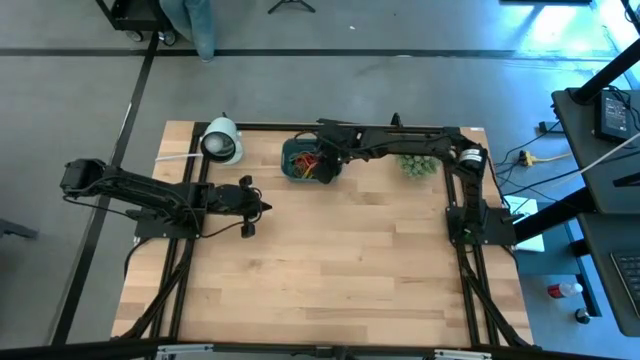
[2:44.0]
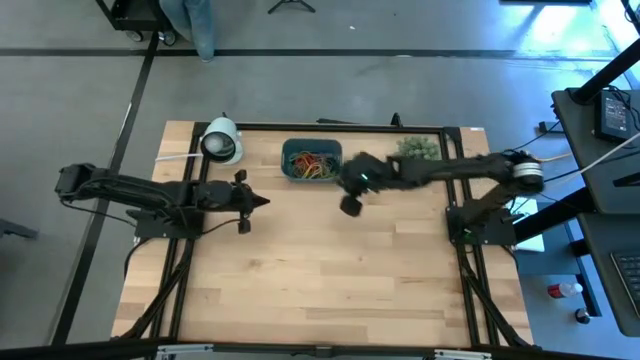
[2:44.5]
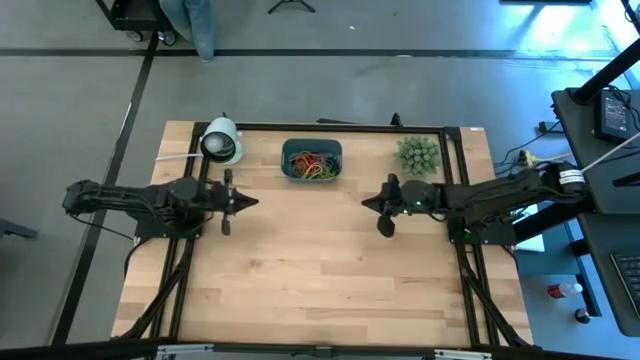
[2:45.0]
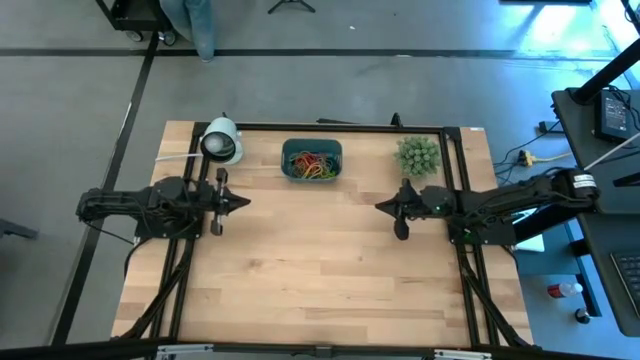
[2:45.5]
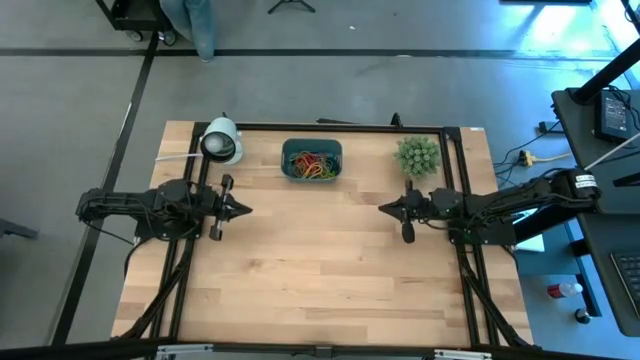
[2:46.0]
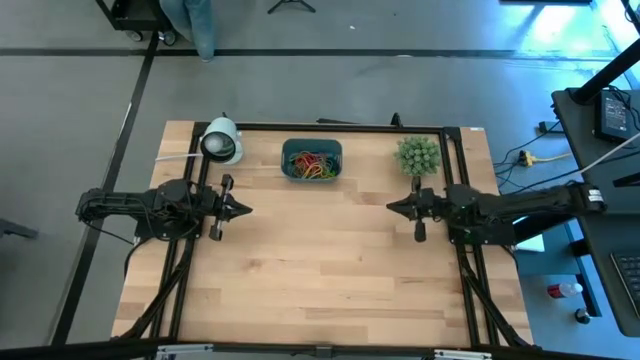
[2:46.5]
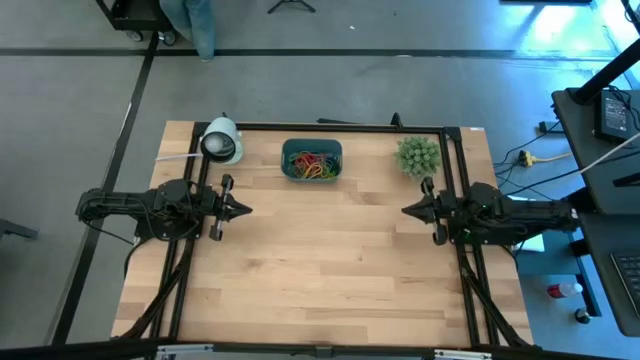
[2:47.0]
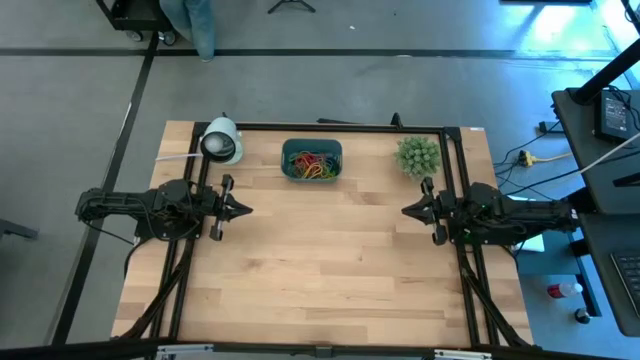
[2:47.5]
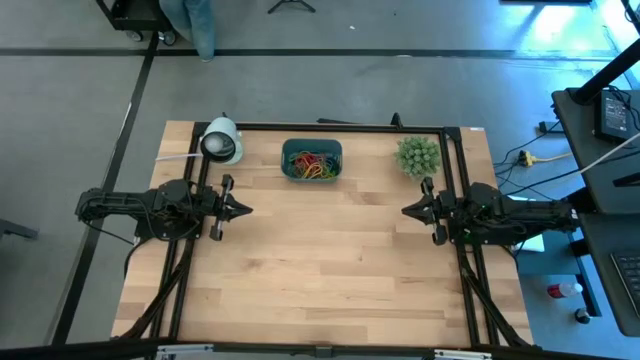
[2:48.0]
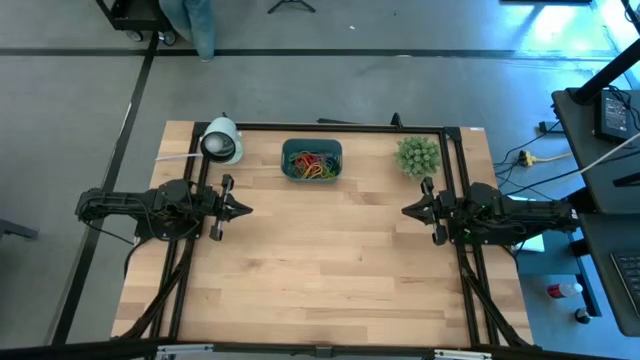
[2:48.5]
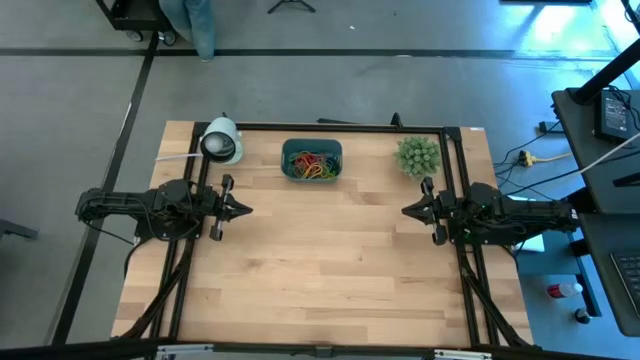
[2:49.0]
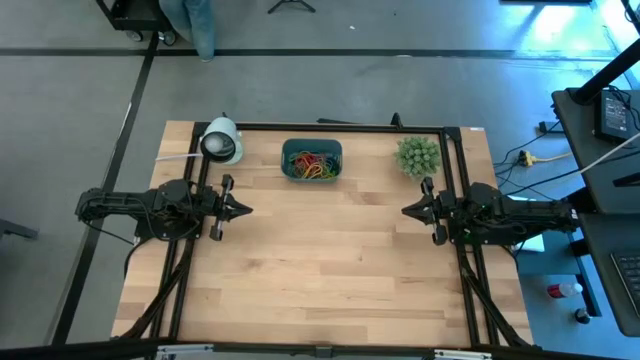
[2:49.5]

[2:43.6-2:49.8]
Task: Pick and place rubber bands into bin
Return to Home Position

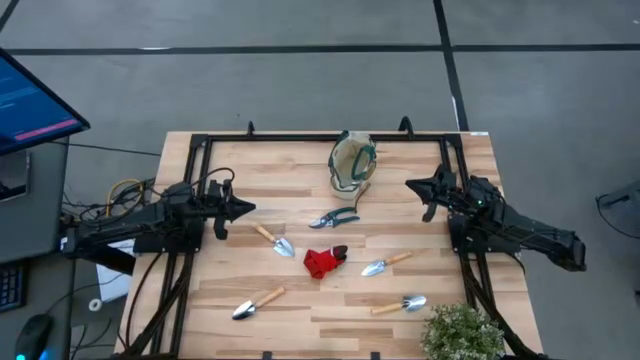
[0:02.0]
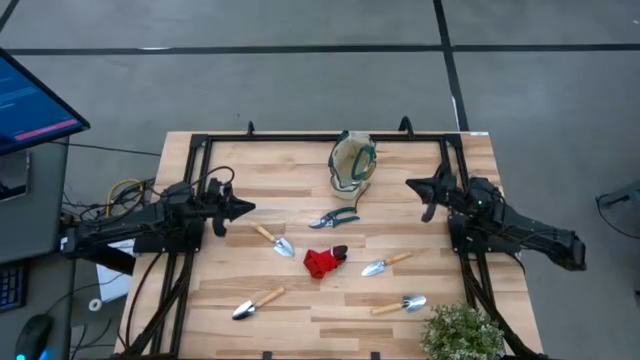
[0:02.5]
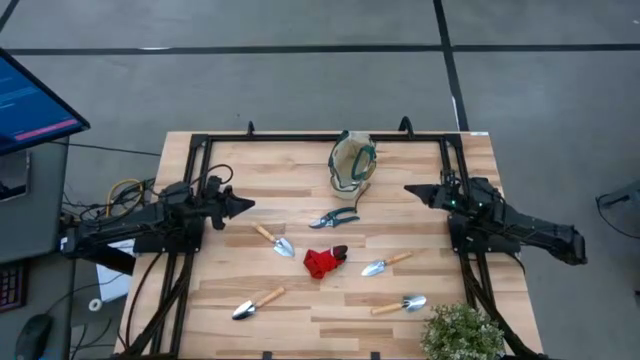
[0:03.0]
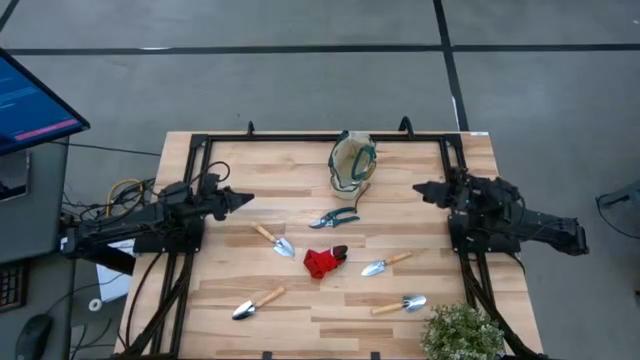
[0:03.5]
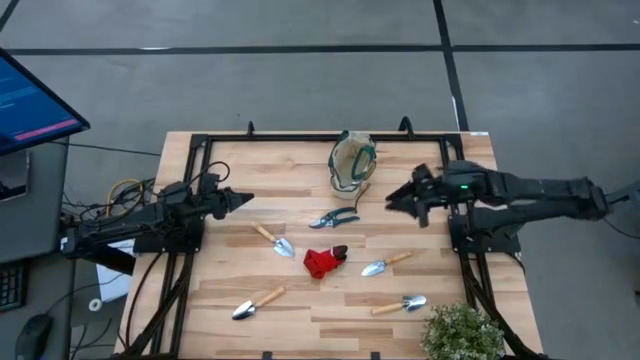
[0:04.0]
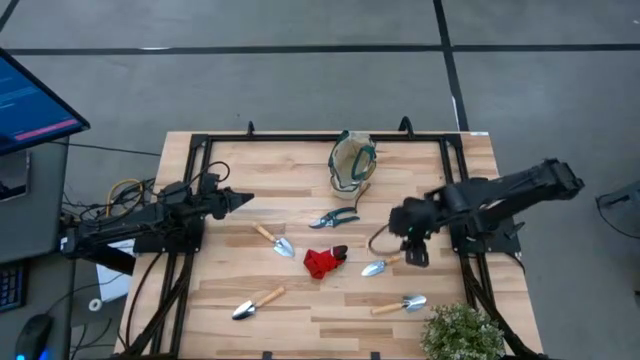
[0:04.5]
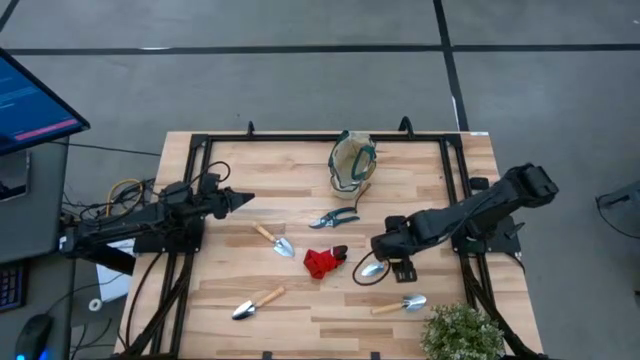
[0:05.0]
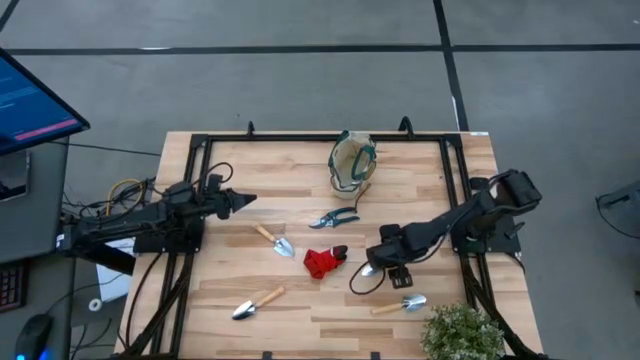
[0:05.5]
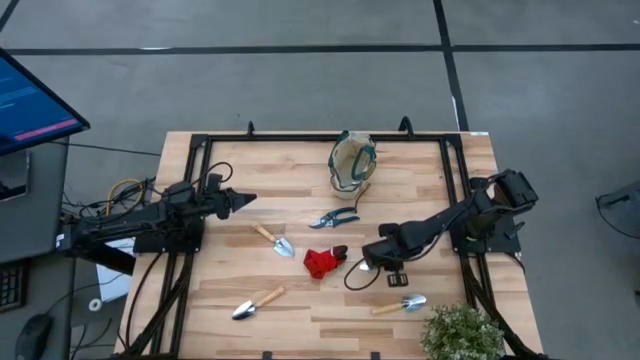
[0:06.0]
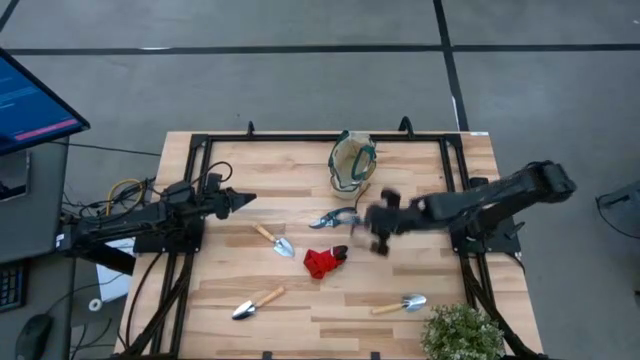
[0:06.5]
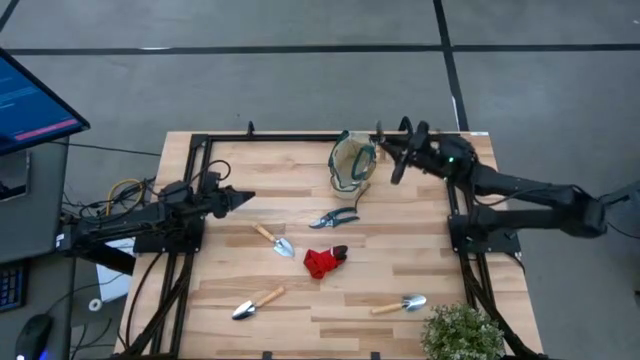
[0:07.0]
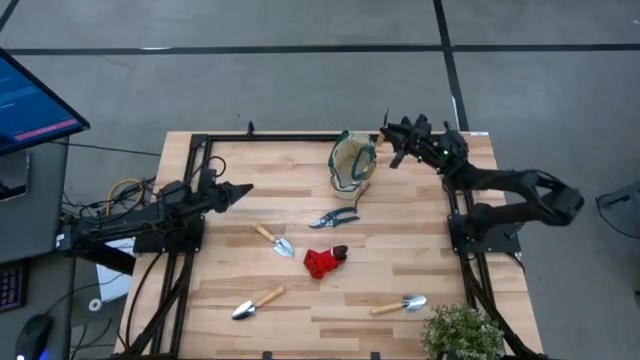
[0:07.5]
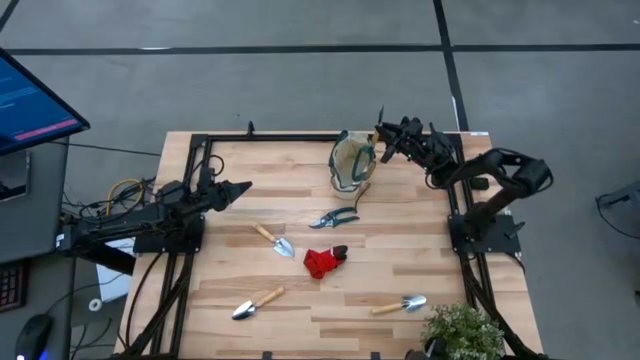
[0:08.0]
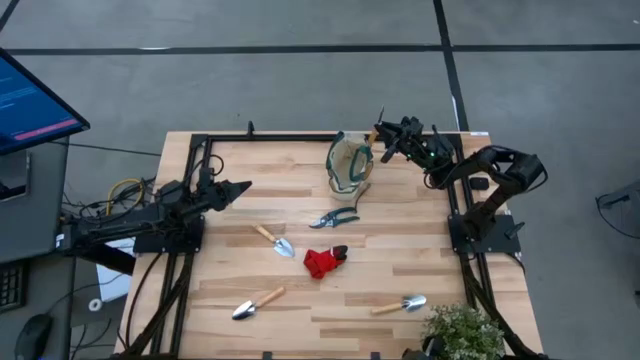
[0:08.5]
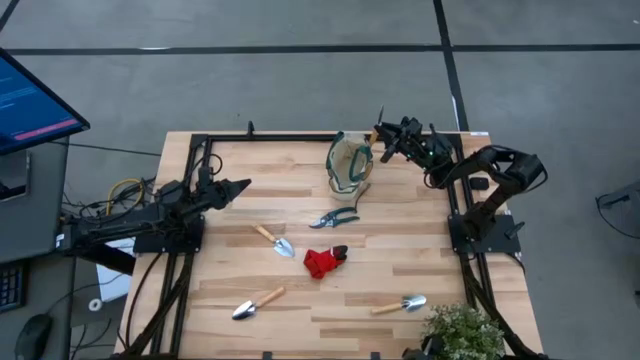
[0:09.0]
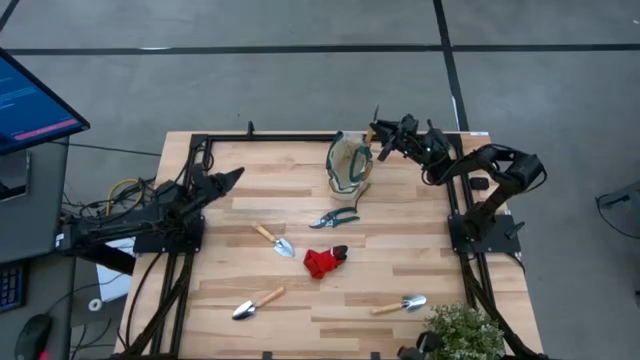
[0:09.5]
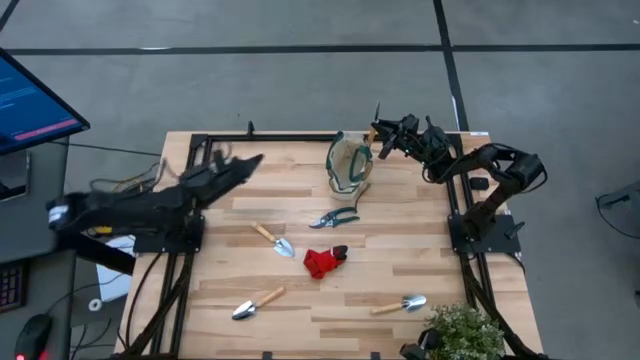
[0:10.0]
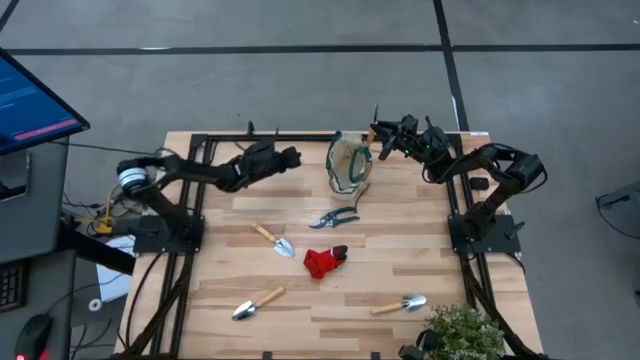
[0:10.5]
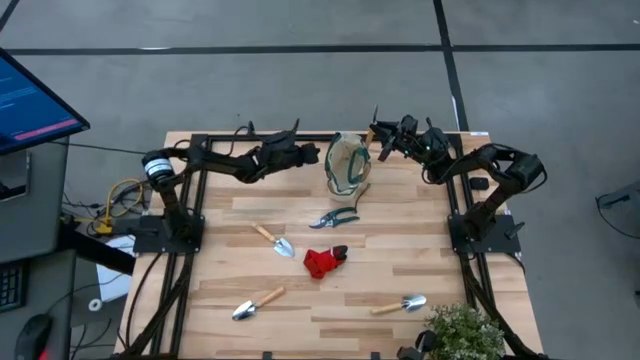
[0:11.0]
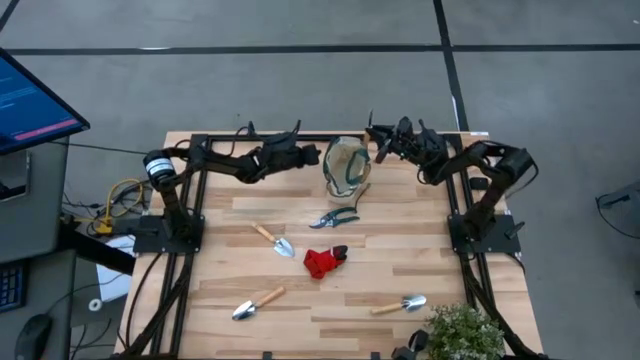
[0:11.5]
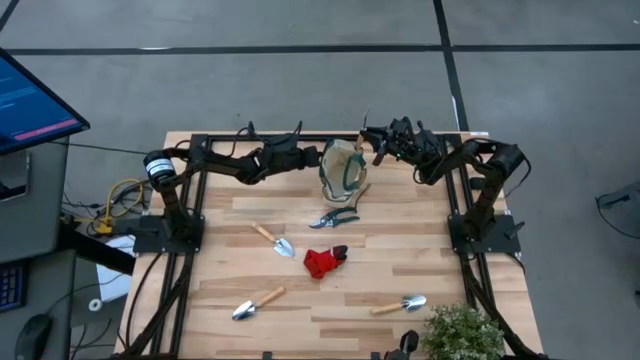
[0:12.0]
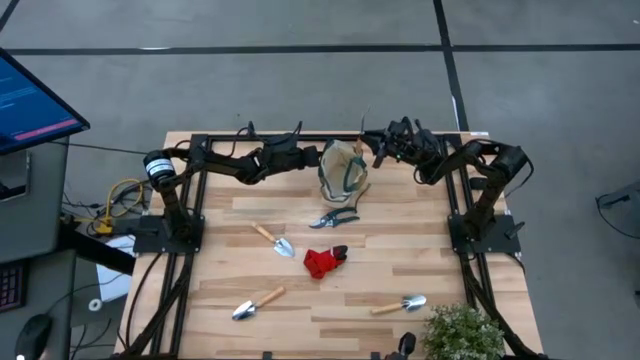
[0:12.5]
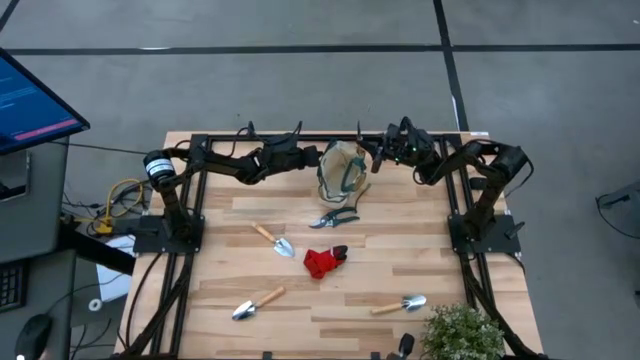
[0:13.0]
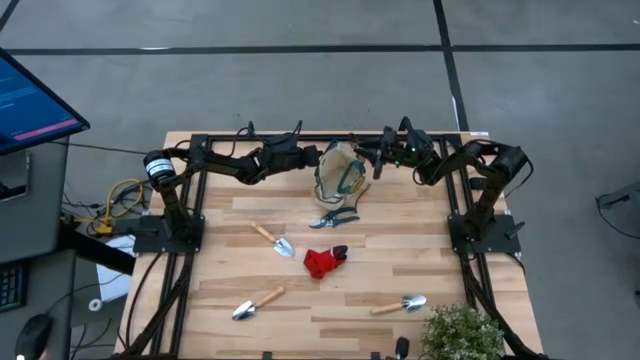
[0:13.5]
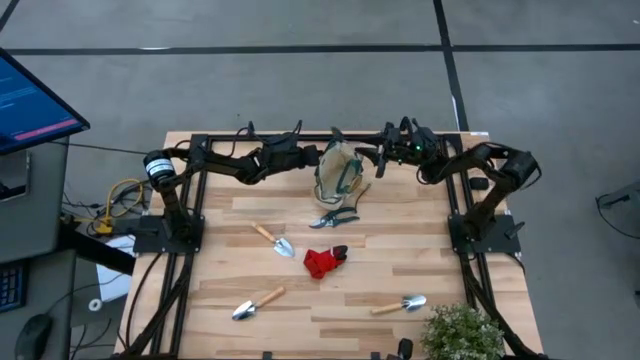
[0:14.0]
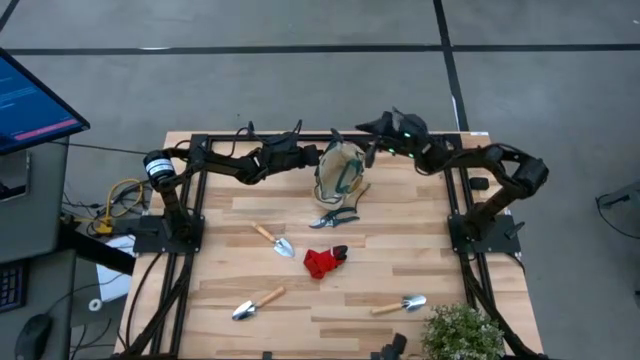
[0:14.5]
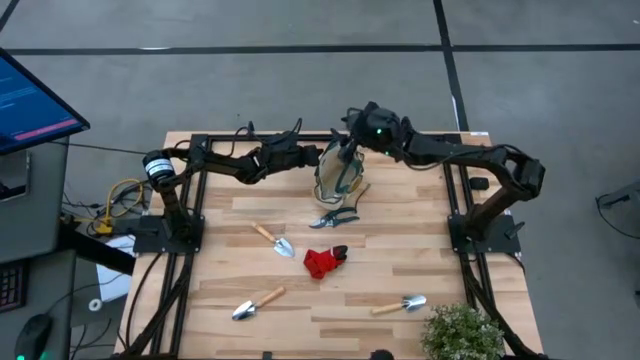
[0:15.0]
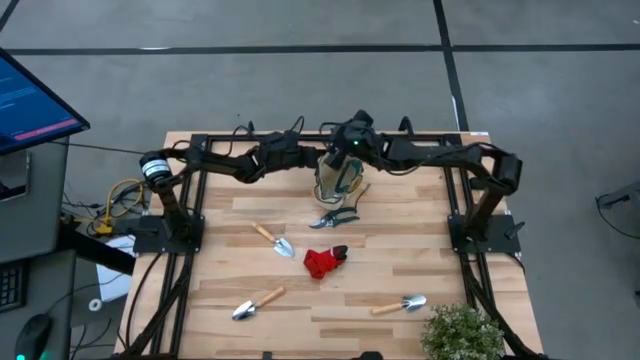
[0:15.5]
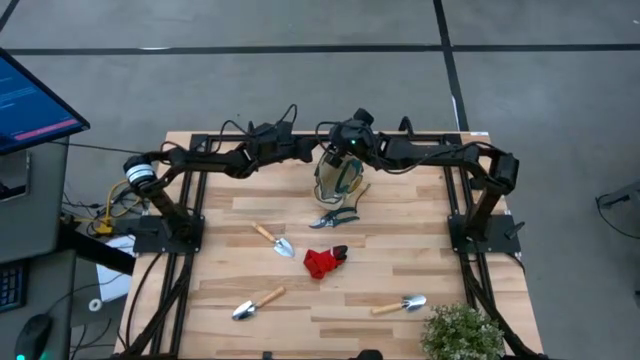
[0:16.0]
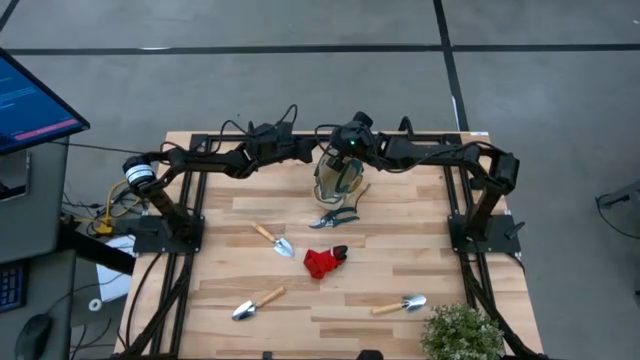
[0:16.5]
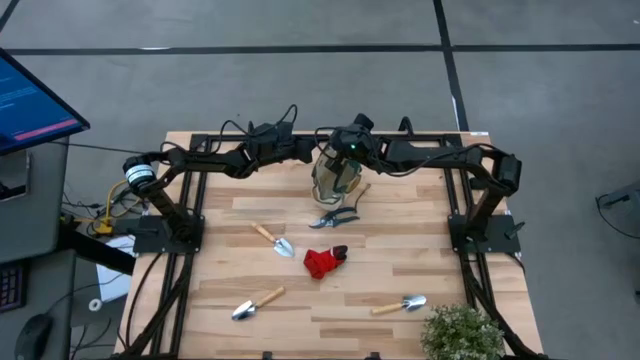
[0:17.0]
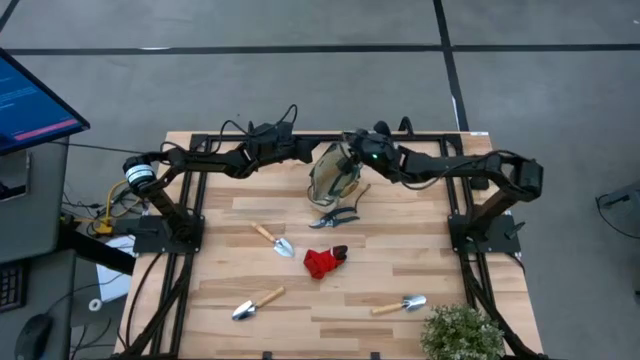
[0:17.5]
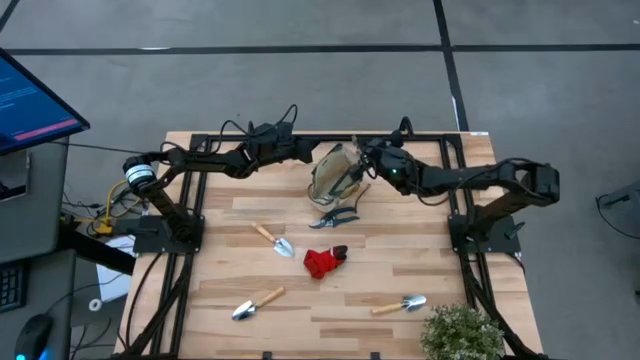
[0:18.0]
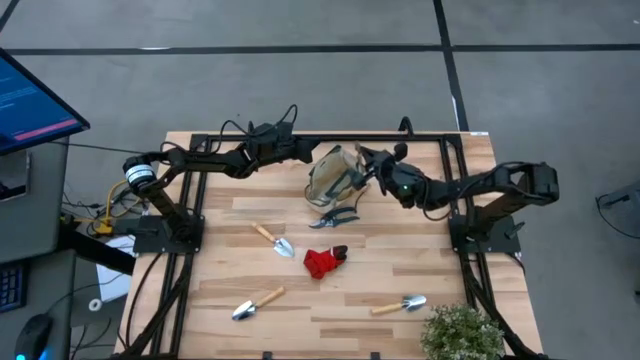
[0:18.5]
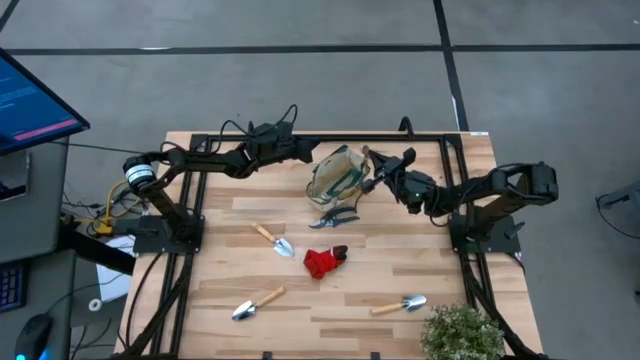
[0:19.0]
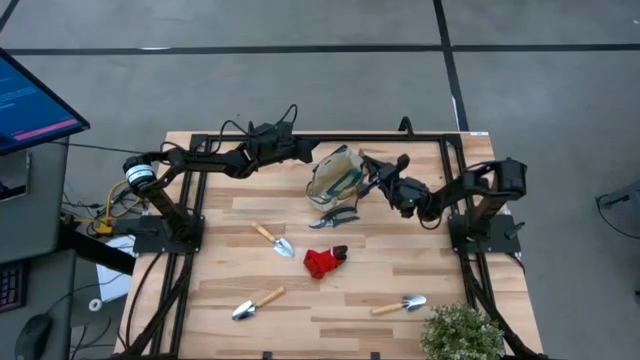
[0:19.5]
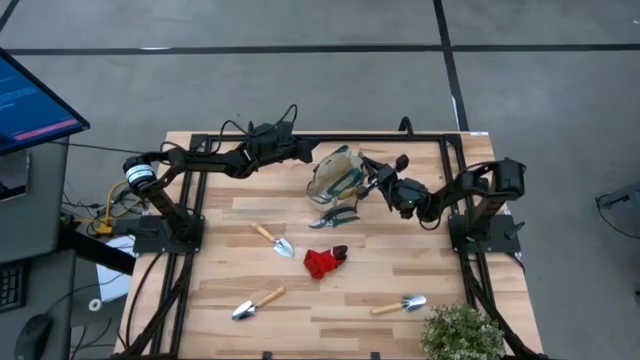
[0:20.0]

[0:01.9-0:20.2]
Task: Pick & Place Garden tools in Gardening bag
Put the trowel into the side pocket of the gardening bag
